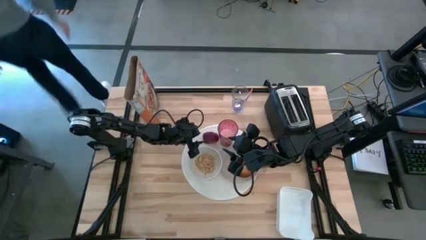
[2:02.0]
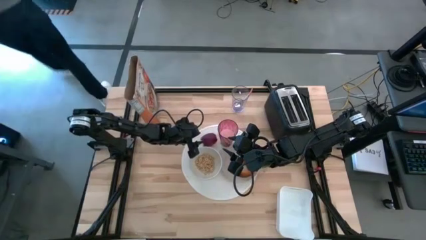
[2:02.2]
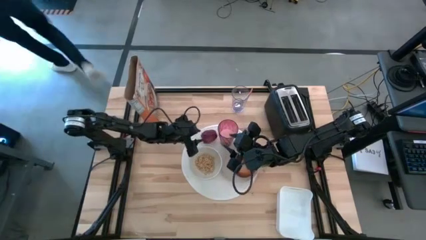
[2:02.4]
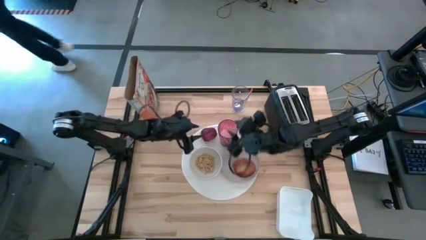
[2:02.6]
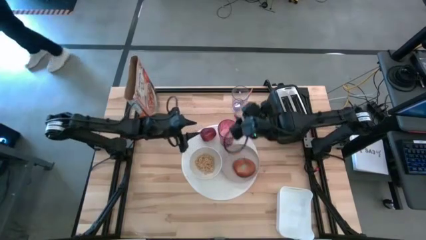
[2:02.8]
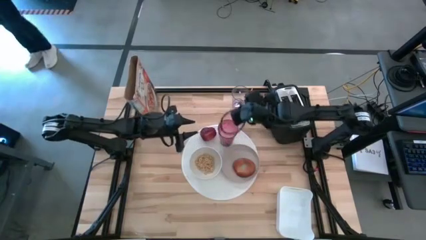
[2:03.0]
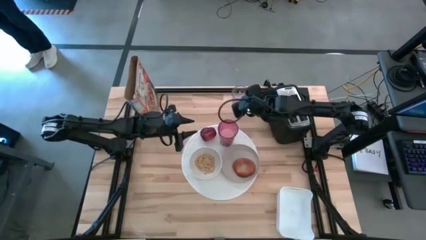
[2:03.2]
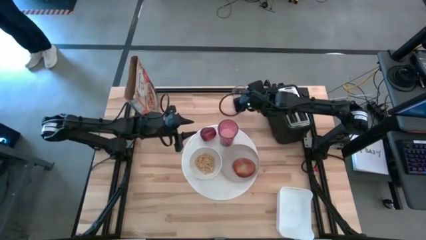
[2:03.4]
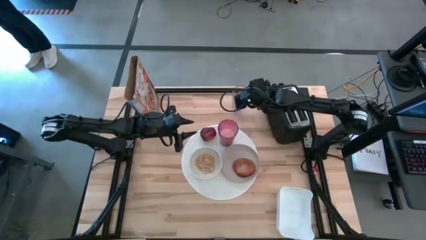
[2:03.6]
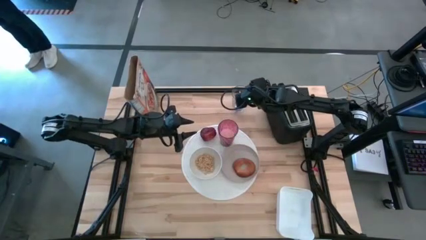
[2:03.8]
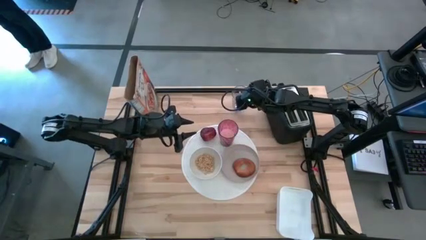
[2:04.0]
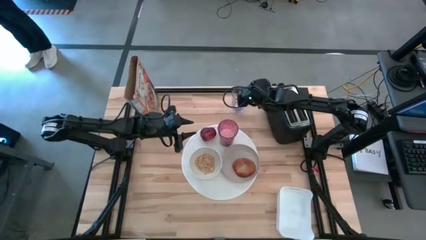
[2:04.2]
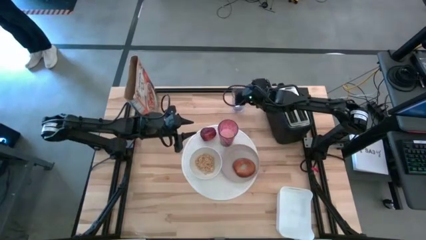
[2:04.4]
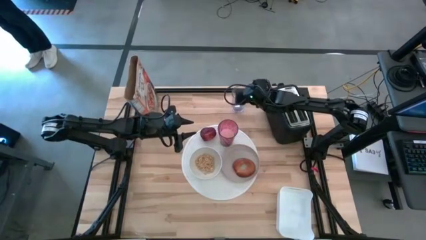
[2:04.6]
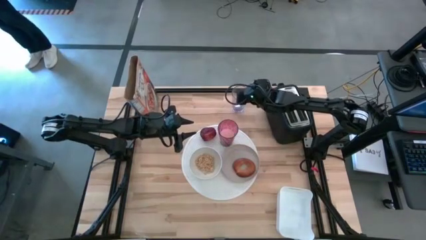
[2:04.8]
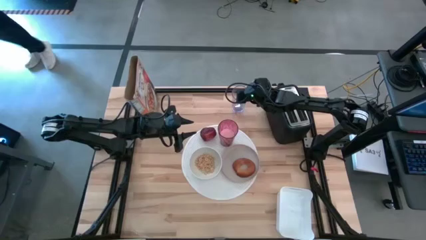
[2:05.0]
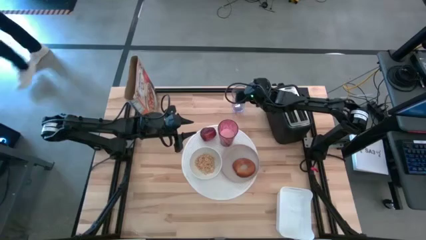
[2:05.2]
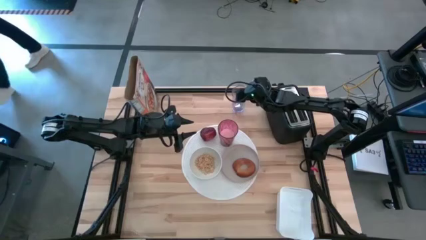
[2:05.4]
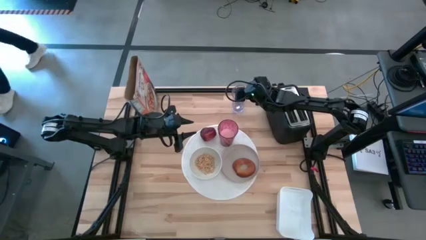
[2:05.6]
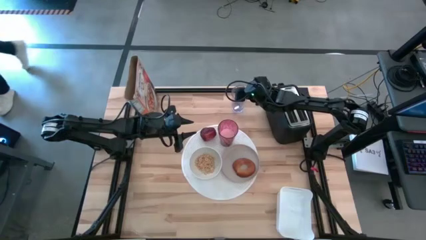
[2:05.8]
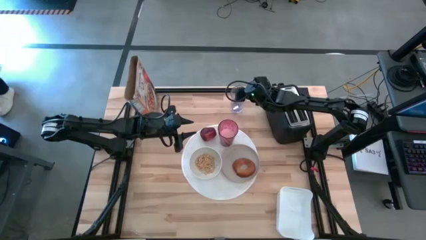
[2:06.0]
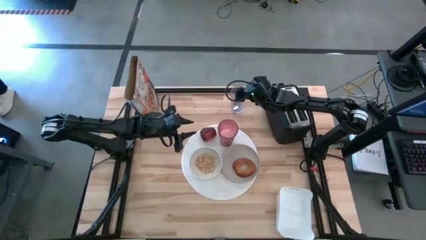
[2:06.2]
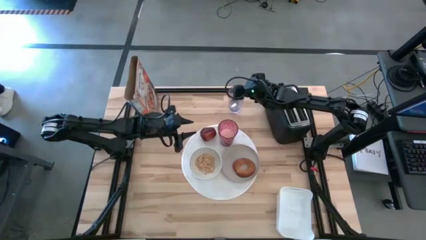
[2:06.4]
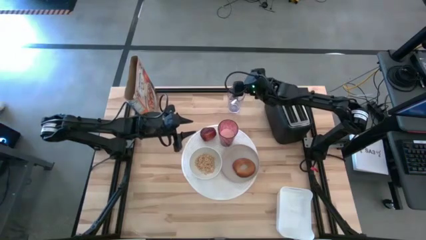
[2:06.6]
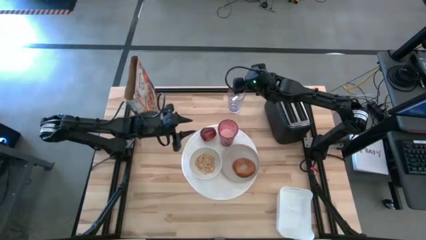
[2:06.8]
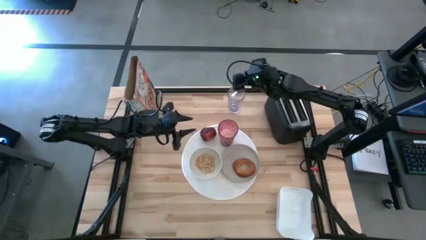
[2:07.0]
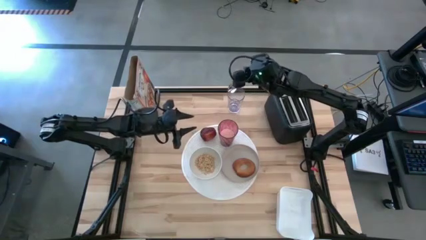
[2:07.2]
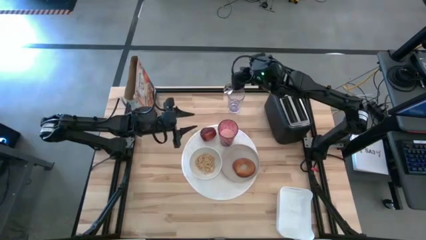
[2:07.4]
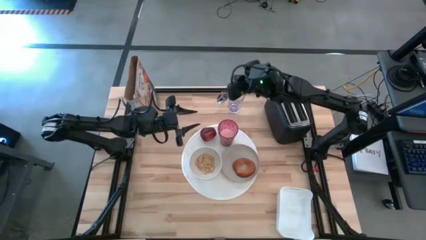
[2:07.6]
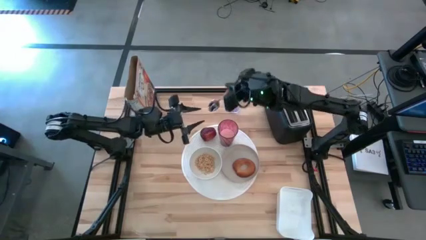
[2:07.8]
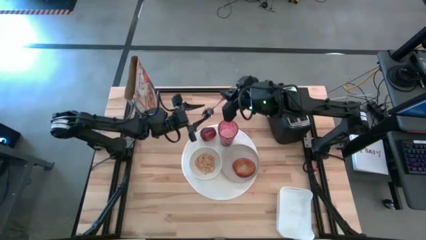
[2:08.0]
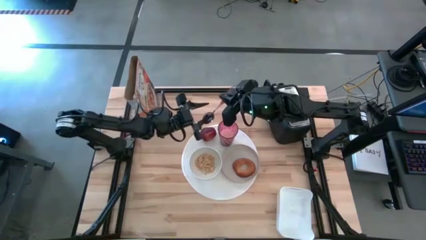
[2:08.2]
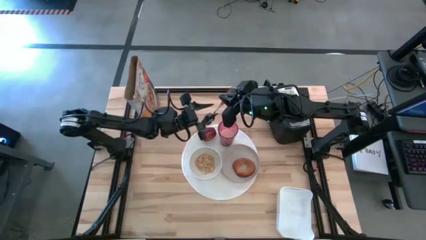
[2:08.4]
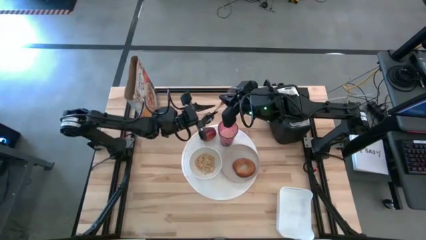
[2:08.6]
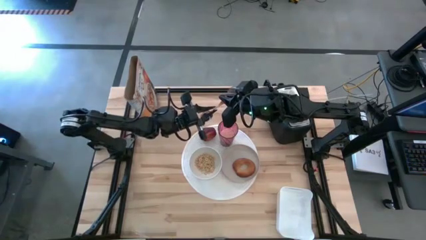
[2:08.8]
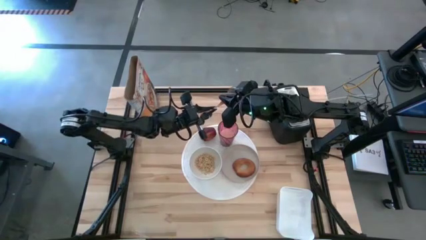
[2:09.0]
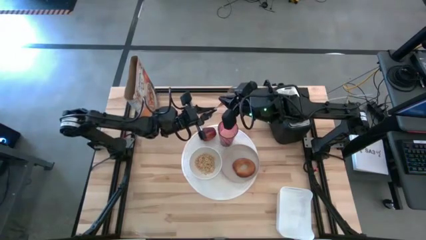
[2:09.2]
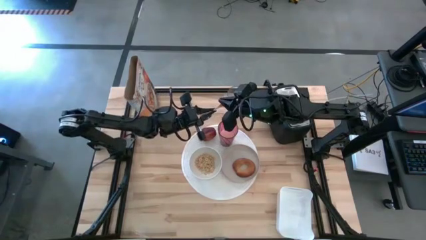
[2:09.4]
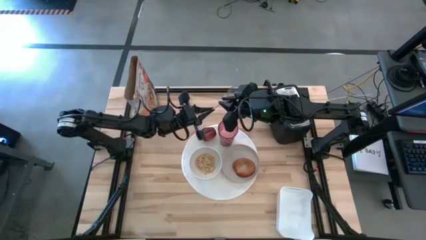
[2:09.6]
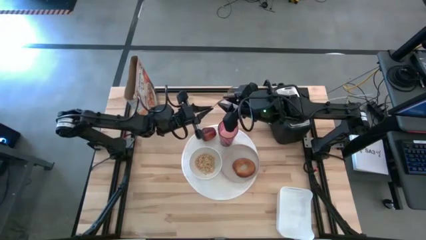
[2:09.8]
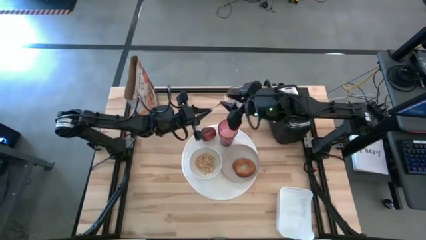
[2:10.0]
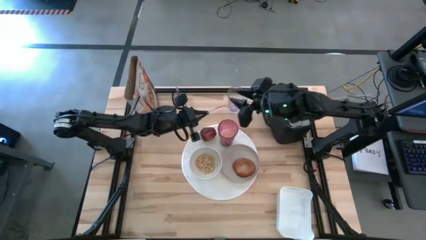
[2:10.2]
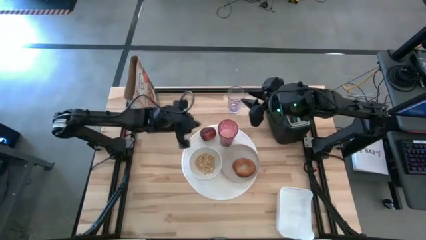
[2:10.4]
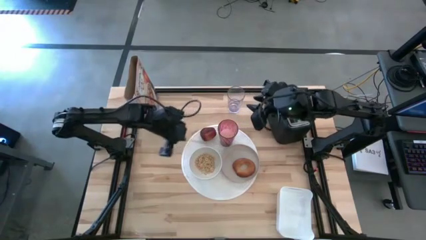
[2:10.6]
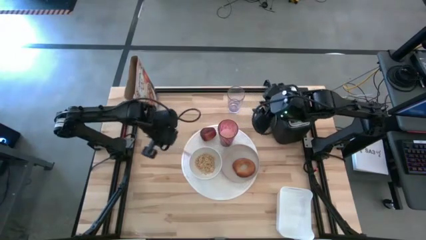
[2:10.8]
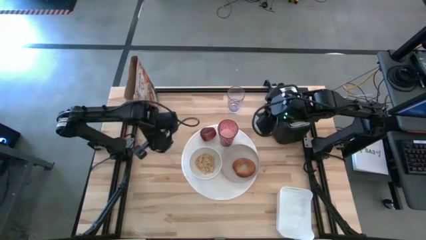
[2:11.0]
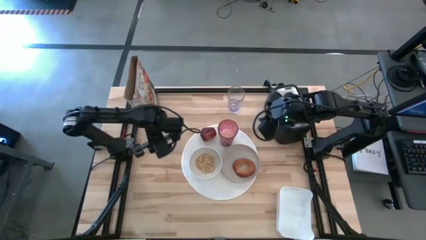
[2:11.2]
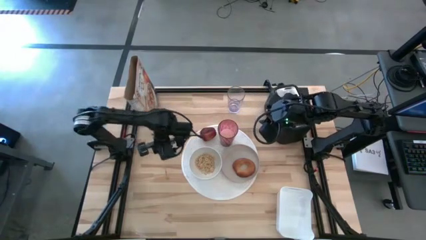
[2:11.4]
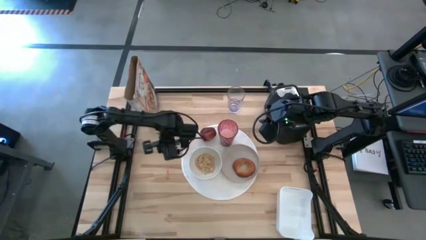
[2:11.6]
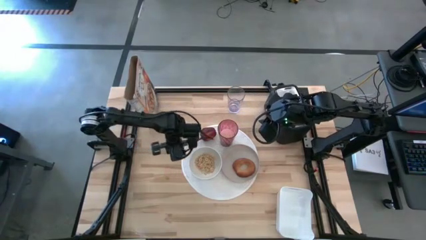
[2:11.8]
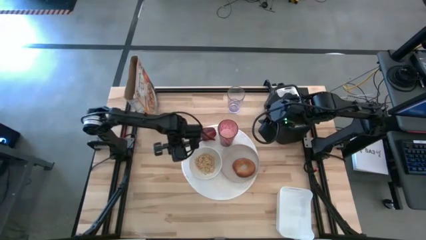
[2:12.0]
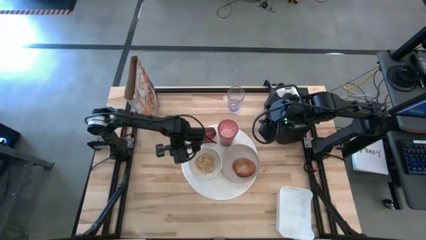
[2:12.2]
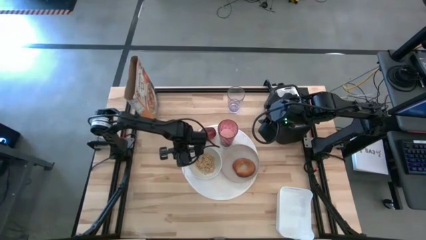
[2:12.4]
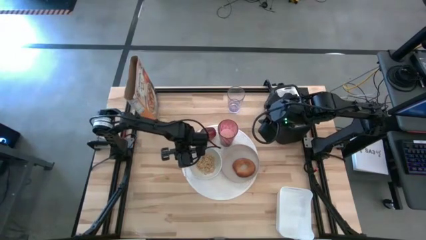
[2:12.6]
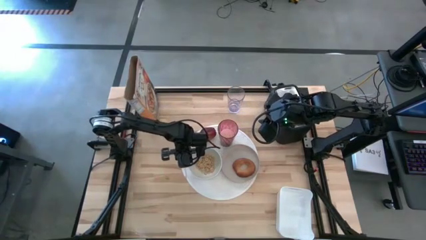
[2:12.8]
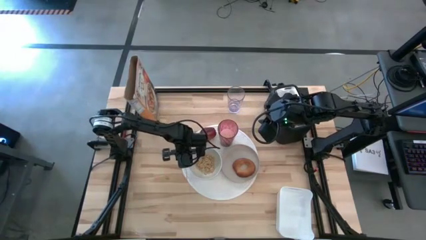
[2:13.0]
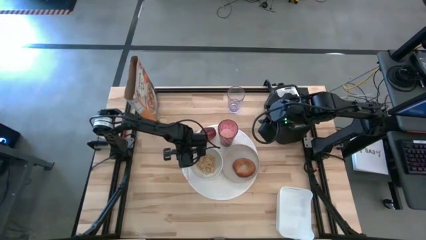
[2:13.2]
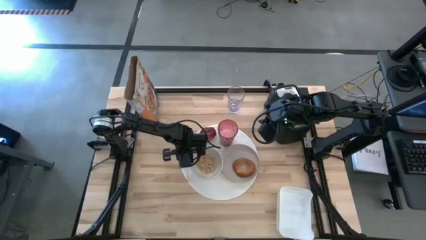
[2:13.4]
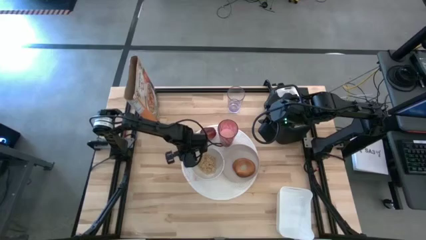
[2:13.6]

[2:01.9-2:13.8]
Task: Arrange a breakfast setting
Put the orange spoon on the white placemat to the left of the white bowl

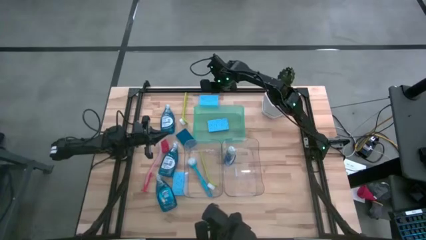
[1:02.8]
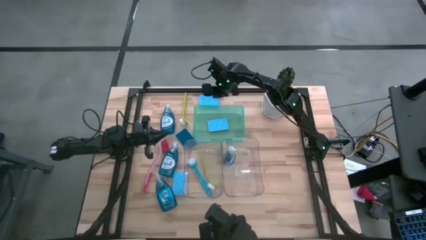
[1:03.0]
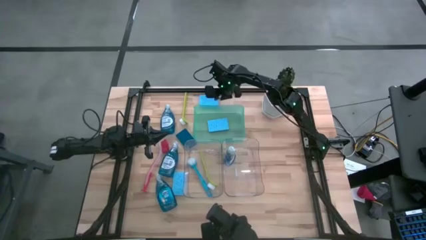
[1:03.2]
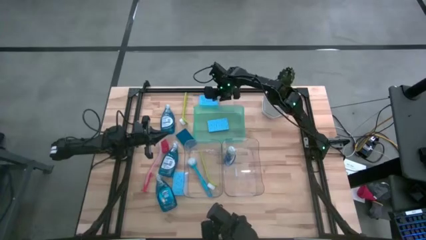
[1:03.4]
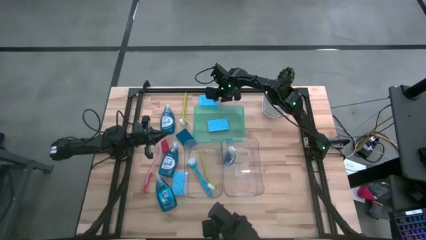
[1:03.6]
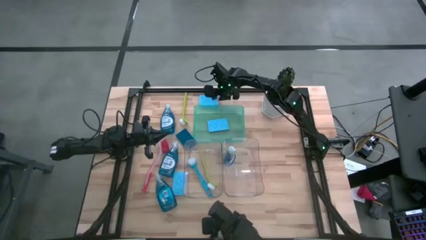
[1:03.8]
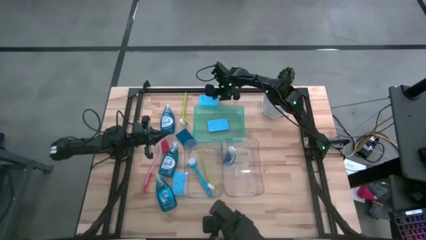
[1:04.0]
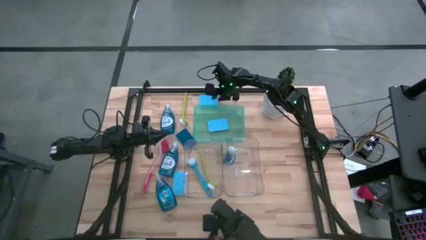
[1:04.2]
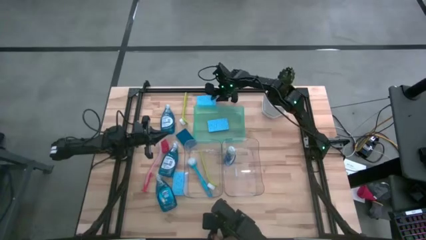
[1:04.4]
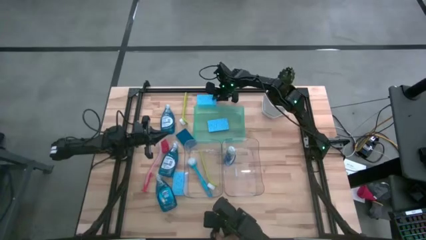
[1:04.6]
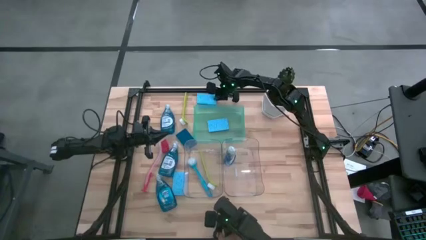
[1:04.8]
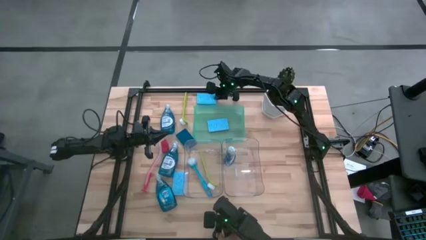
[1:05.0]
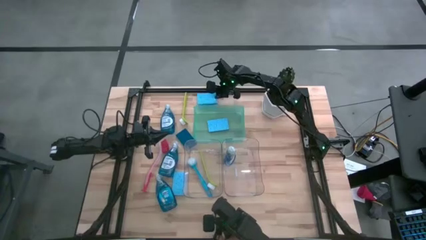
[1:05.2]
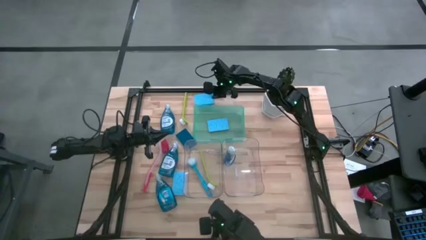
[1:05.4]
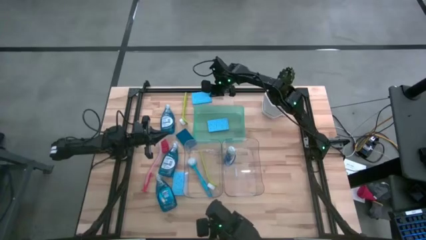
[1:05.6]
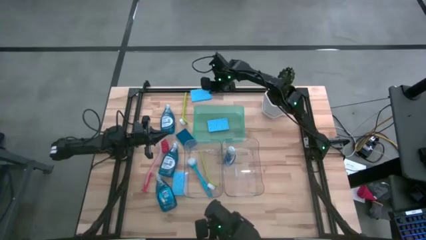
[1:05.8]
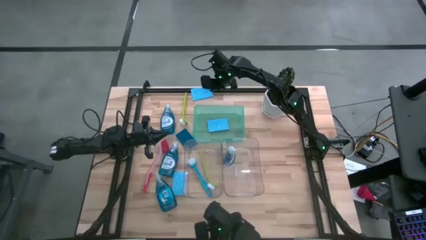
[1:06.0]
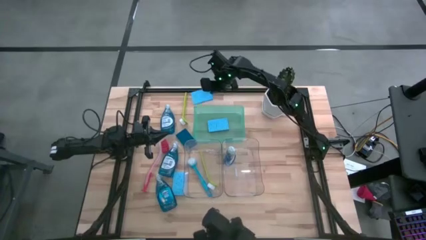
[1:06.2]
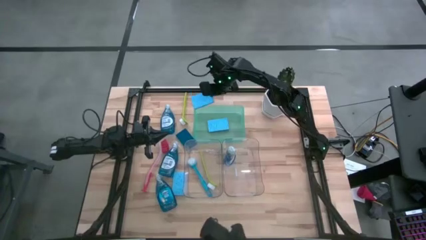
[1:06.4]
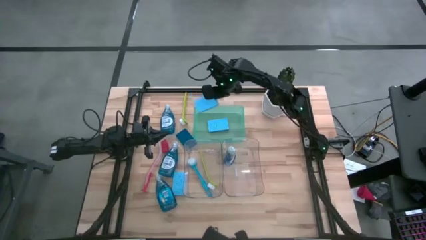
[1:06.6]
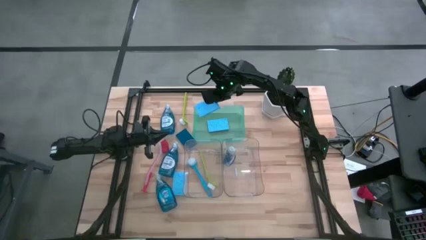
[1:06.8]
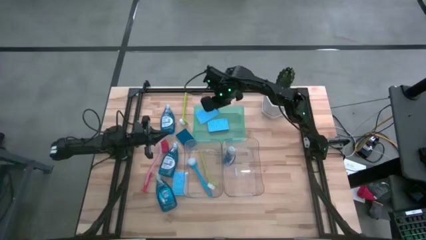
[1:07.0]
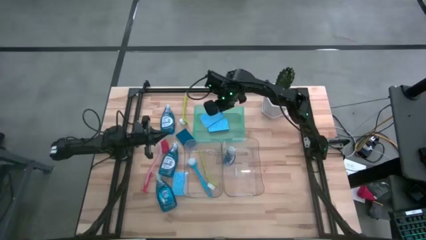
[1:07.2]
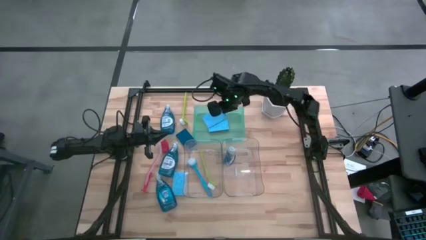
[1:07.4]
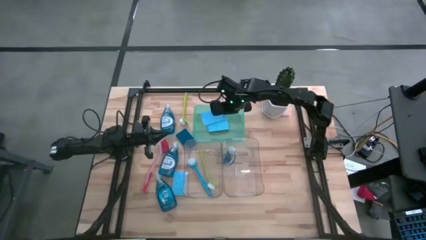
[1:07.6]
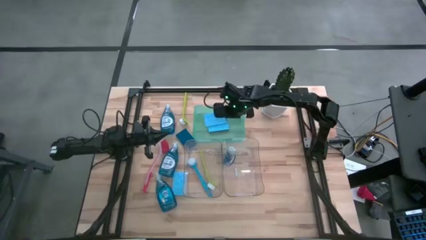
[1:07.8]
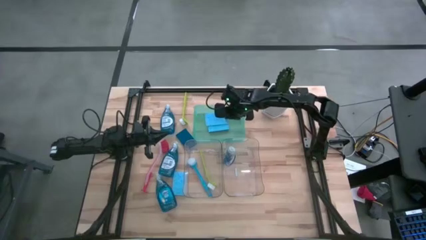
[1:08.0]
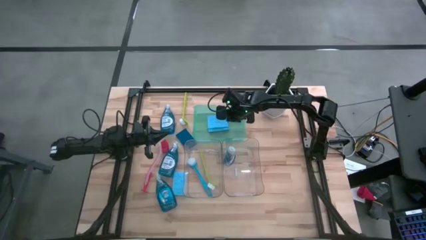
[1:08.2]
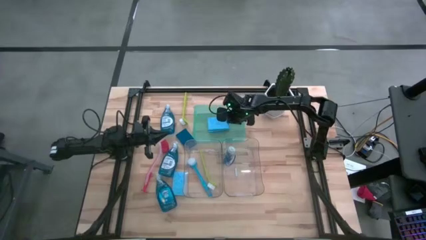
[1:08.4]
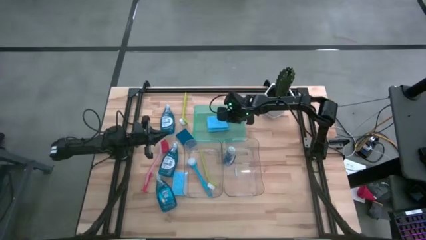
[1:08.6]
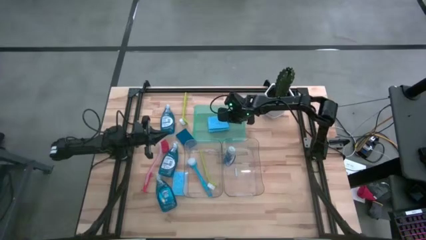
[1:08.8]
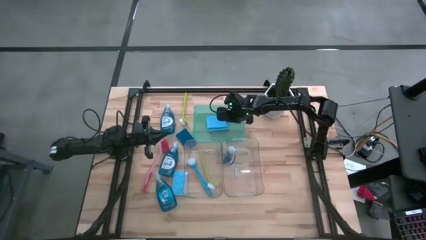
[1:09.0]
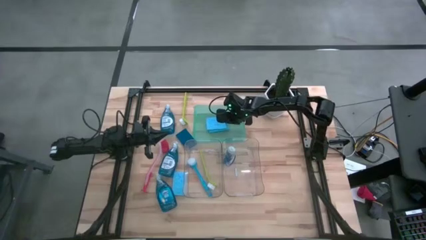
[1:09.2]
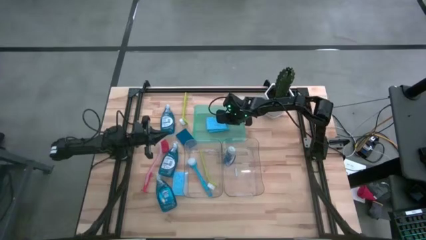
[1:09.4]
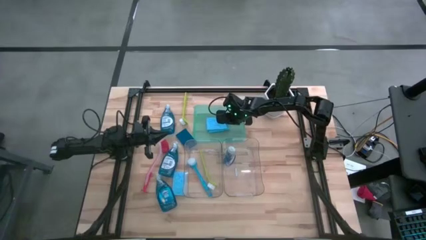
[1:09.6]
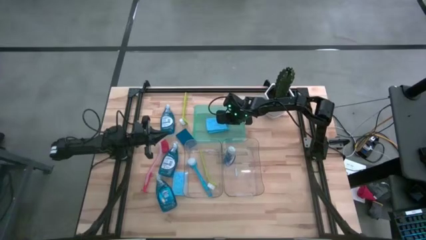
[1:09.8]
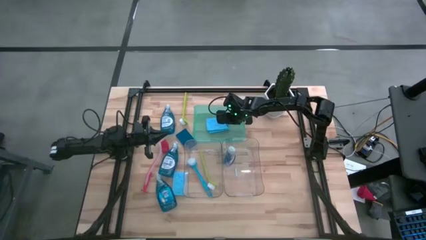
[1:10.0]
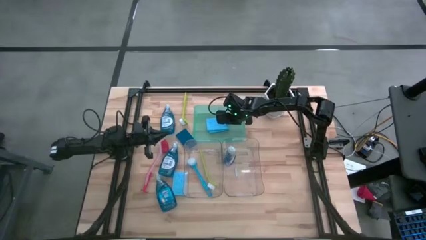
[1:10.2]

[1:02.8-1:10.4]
Task: Pick & Place Kitchen Sink Supplies
Put the blue sponge into the green bin
